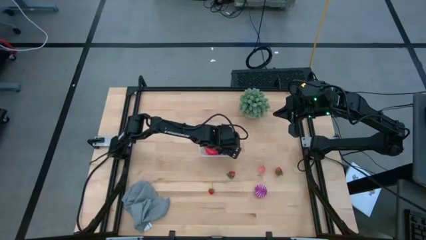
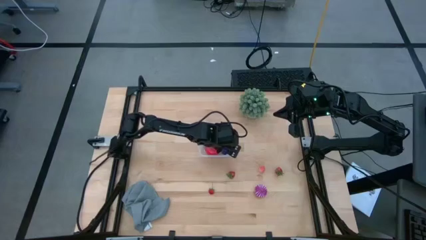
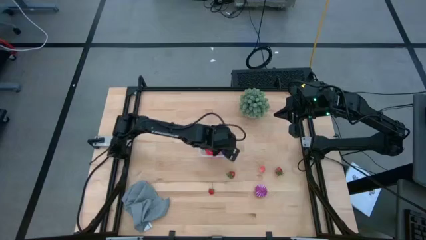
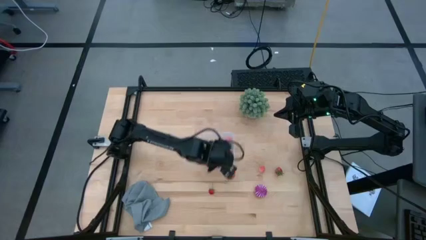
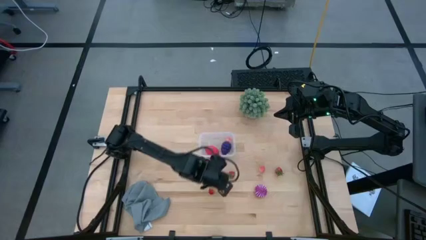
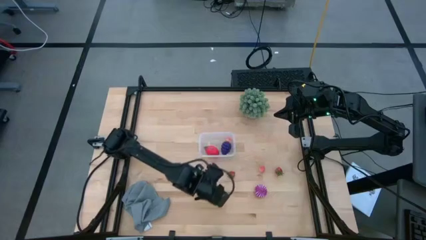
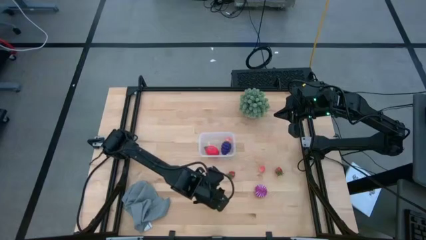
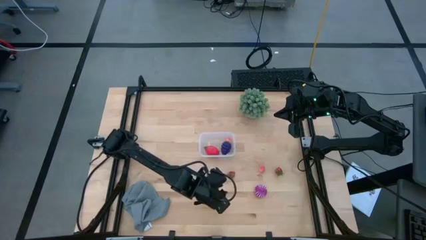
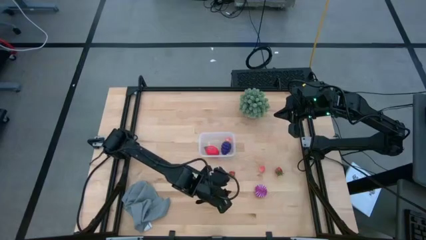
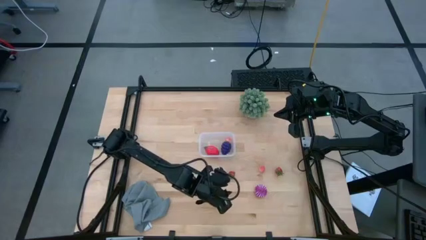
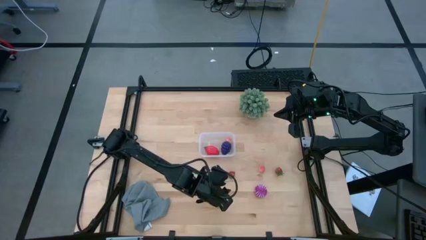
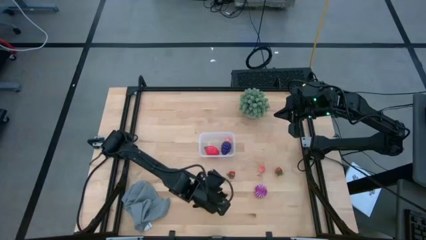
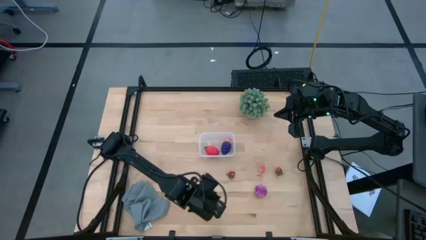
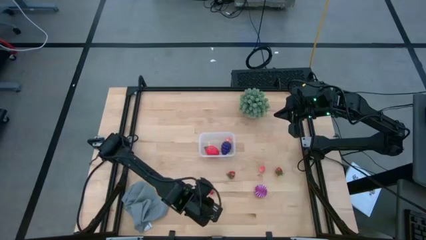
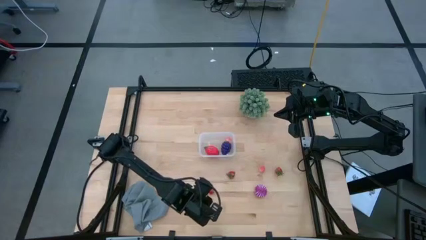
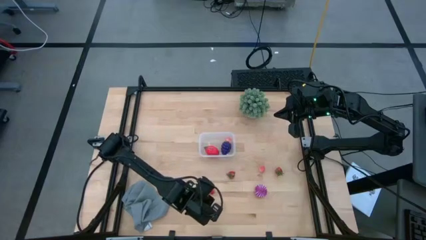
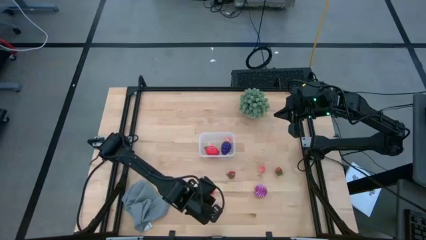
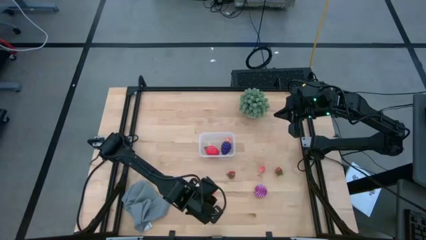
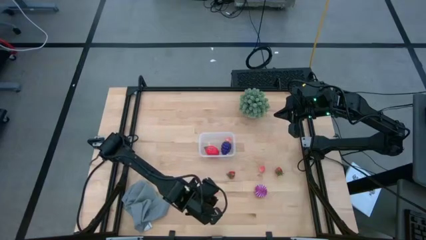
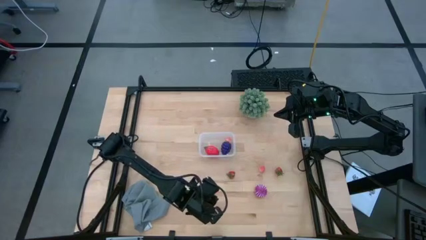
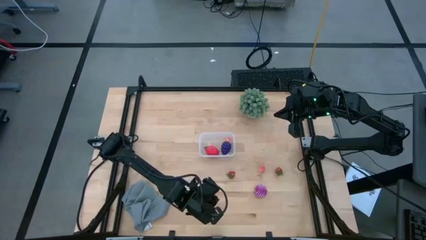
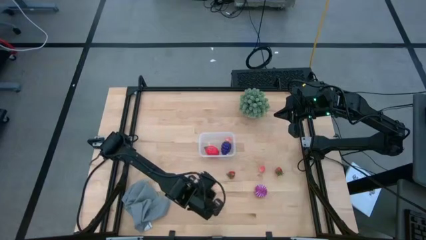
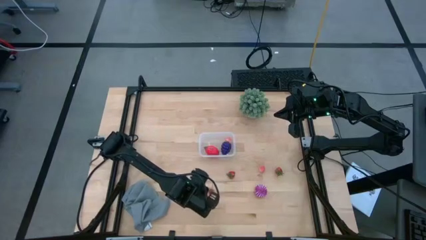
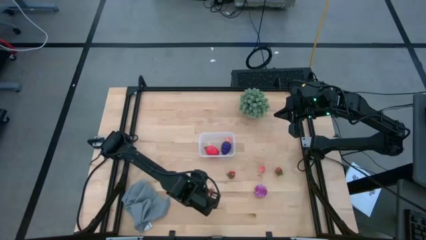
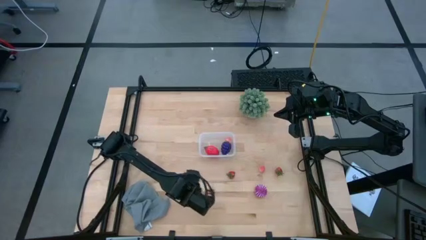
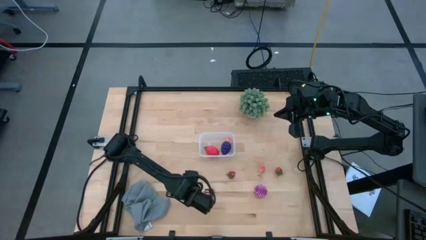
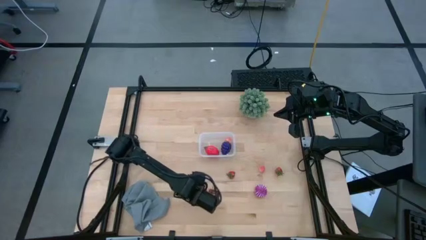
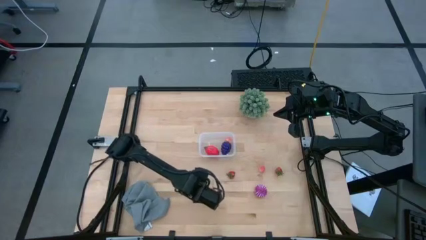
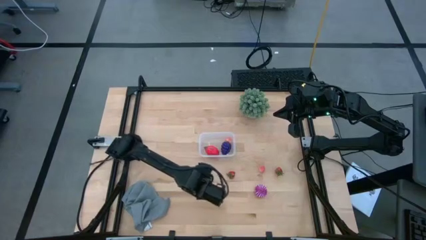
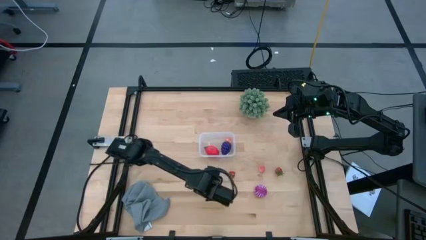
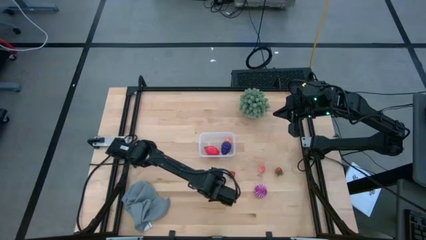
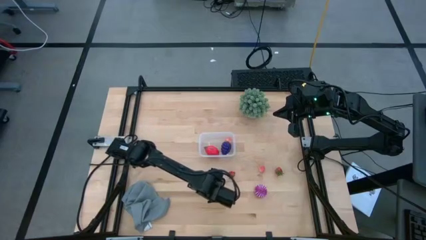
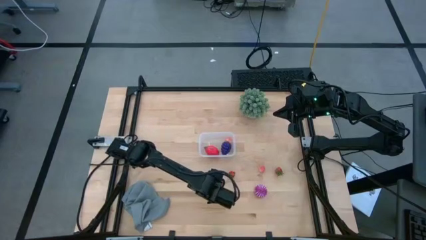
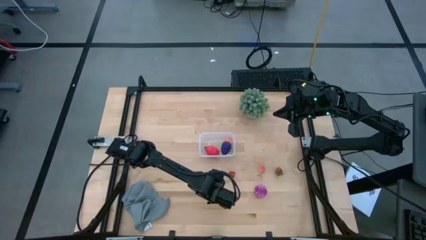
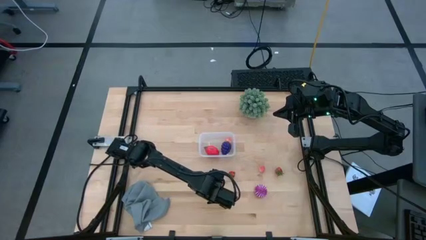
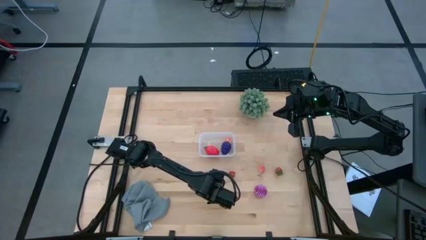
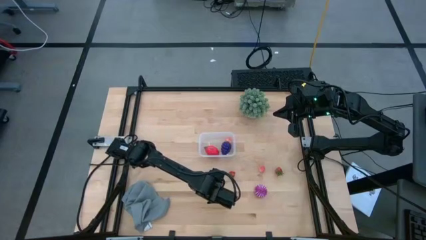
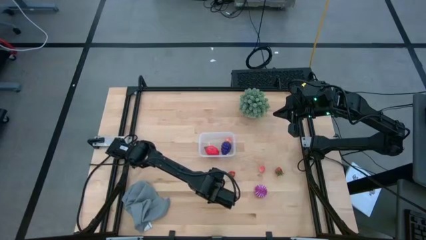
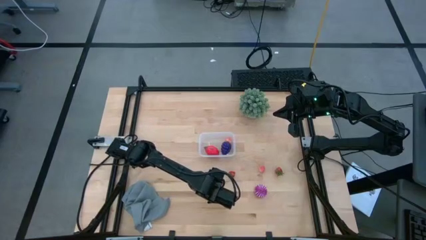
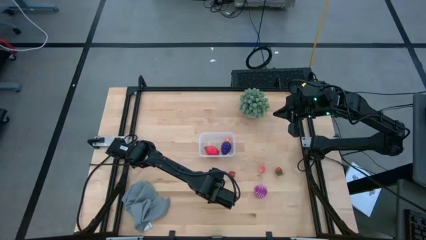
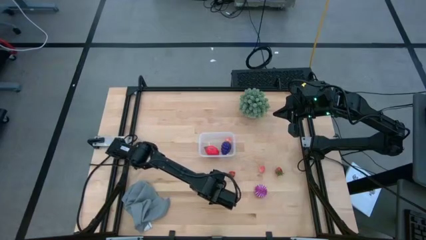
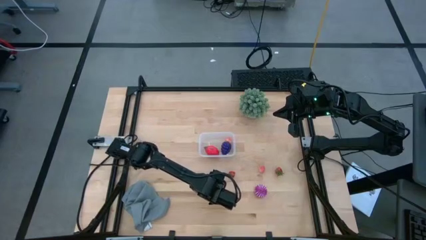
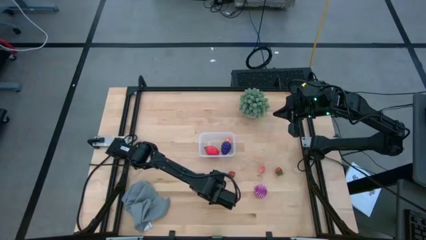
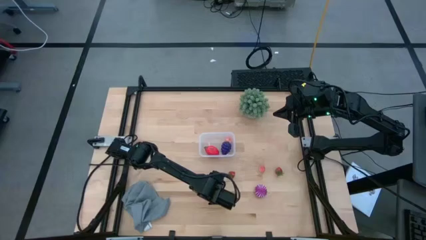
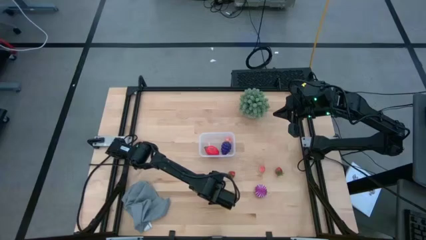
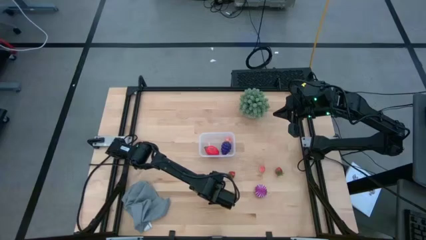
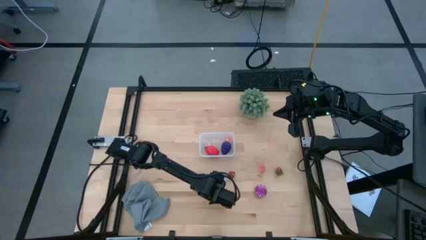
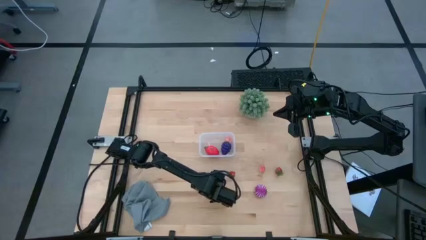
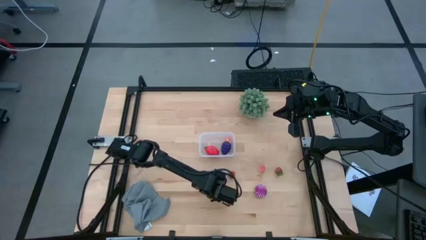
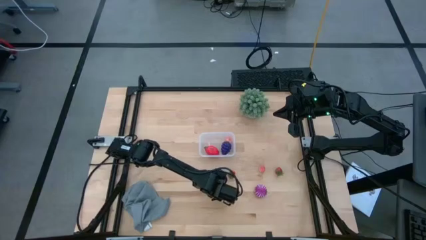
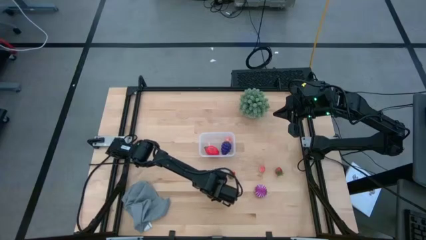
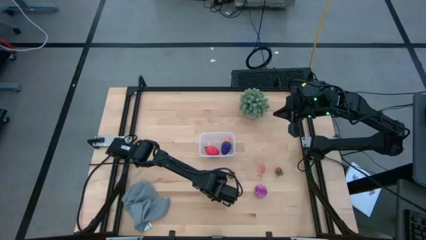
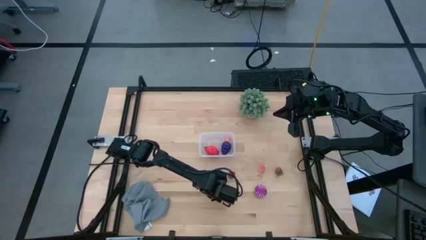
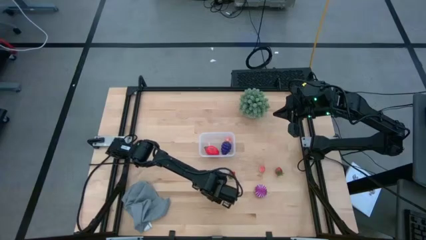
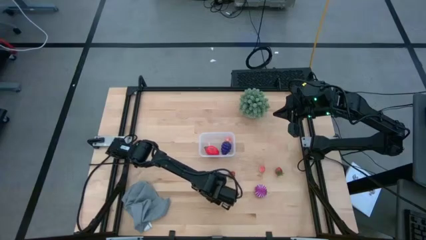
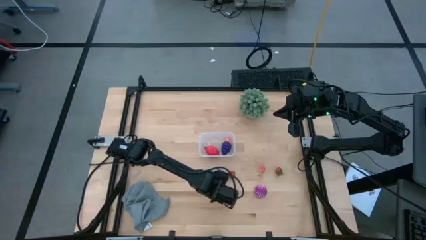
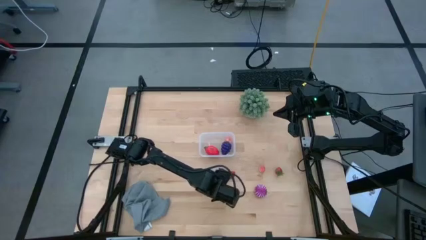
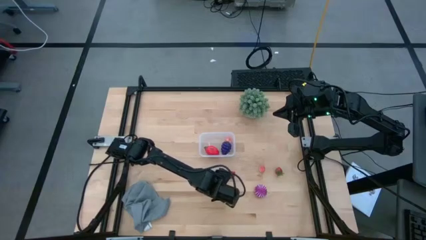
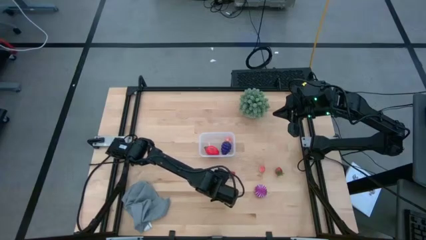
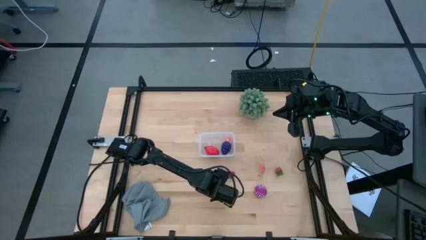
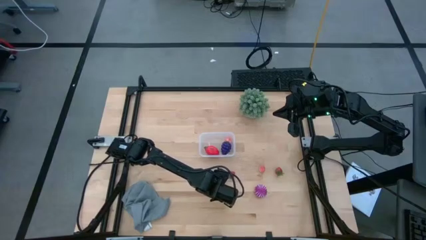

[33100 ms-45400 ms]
Task: Pick and placing Produce into tupperware
Put the left red strawberry into the transparent bin

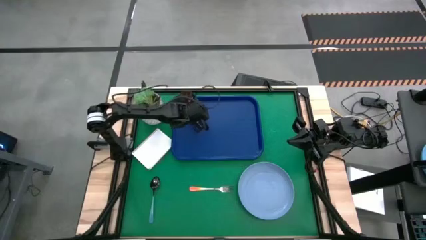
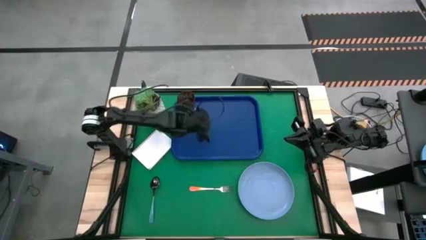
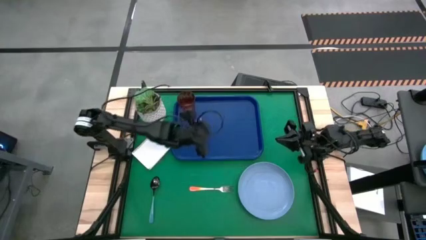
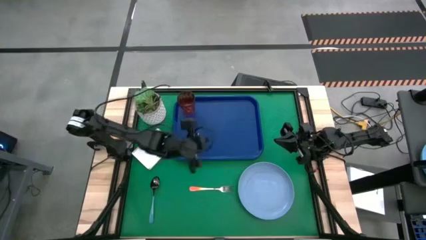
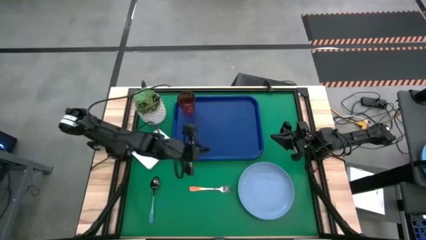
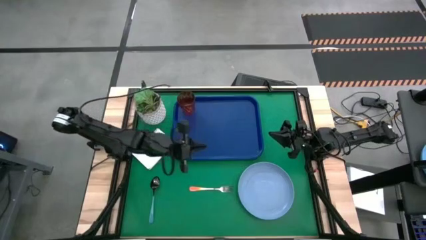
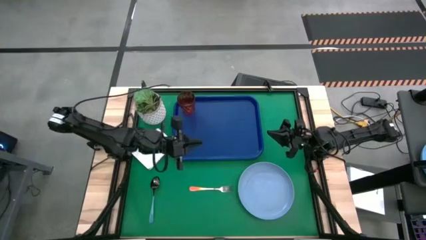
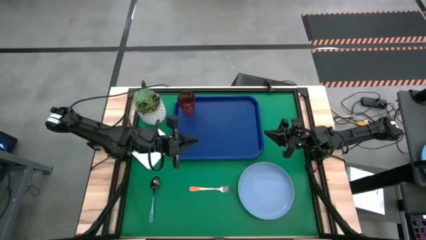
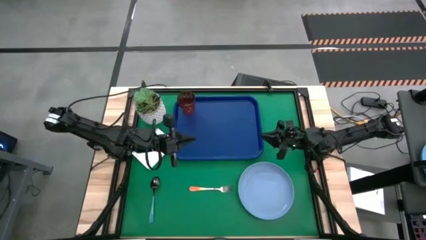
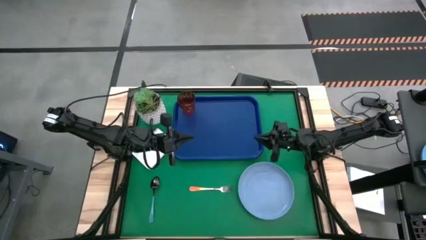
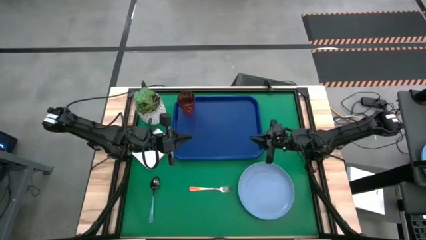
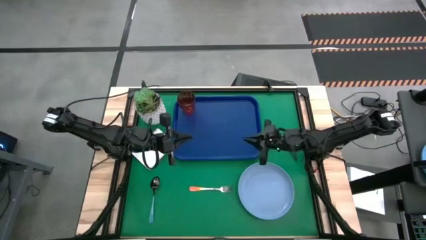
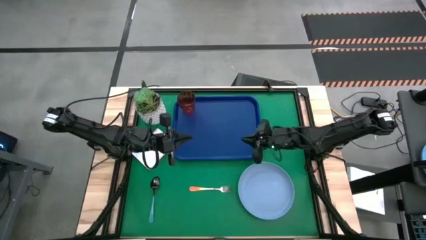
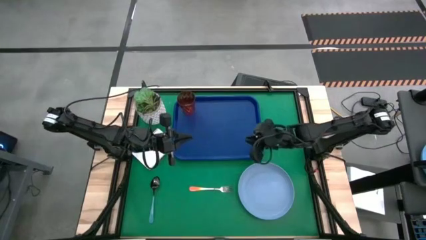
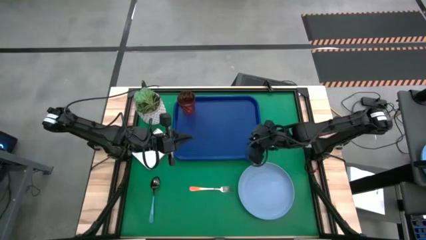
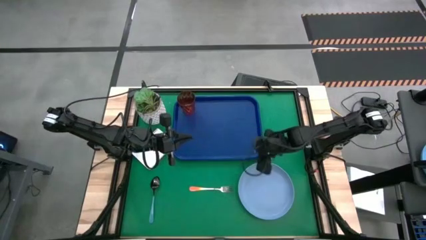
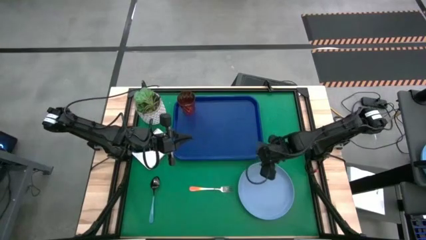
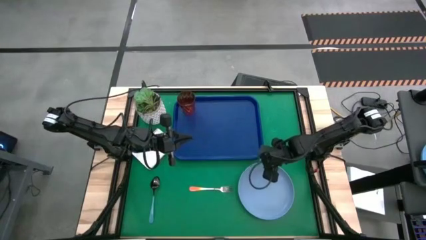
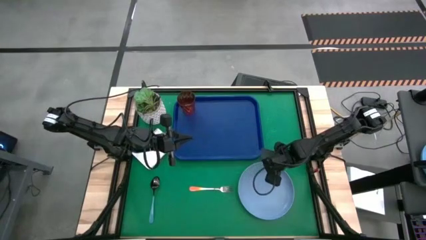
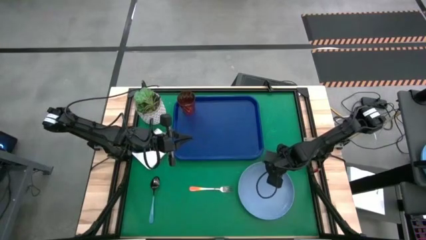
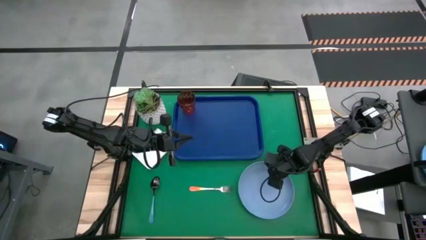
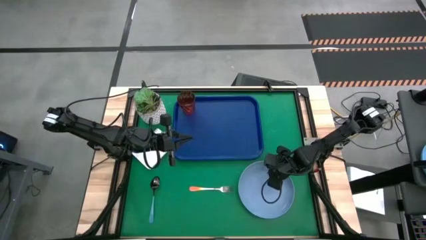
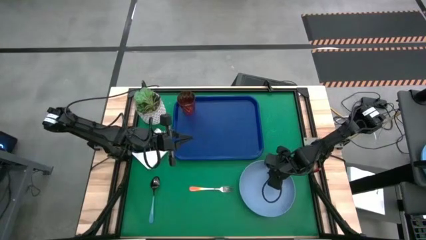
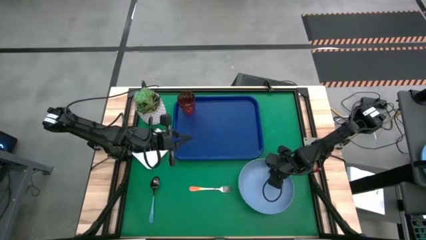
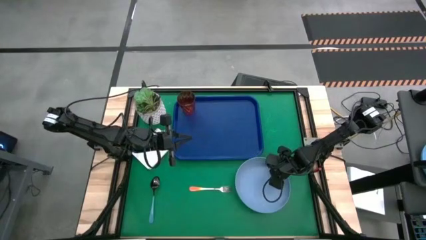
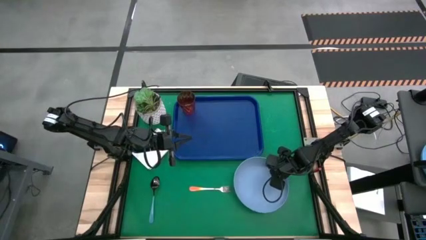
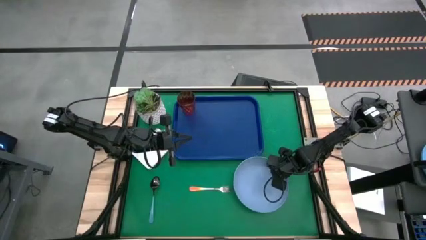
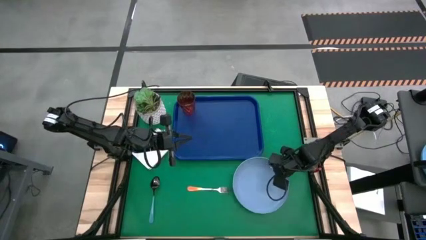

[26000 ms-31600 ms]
Task: Pick and place plate/cup/fork/spoon on tray
Put the light blue plate on the blue tray to the bottom right of the red cup
